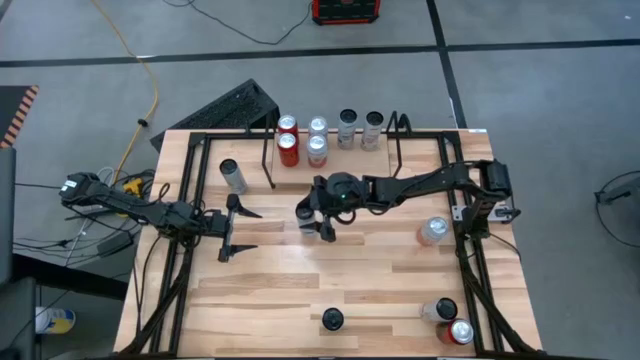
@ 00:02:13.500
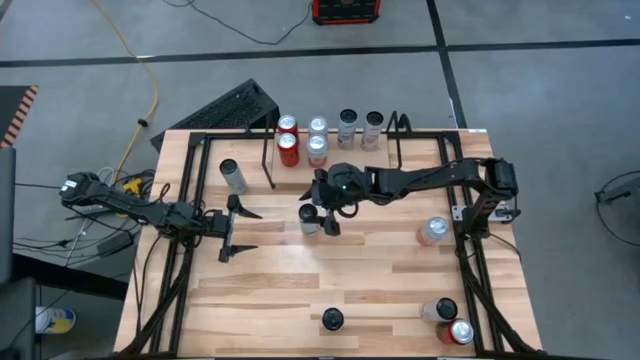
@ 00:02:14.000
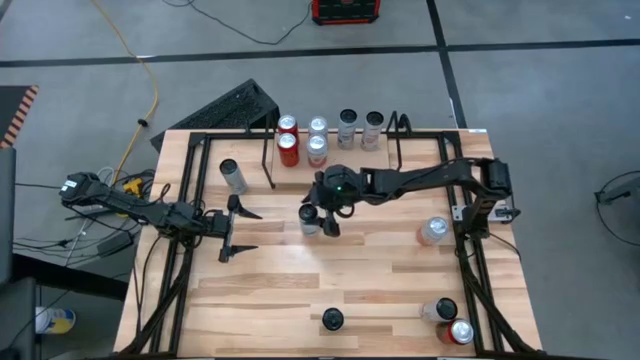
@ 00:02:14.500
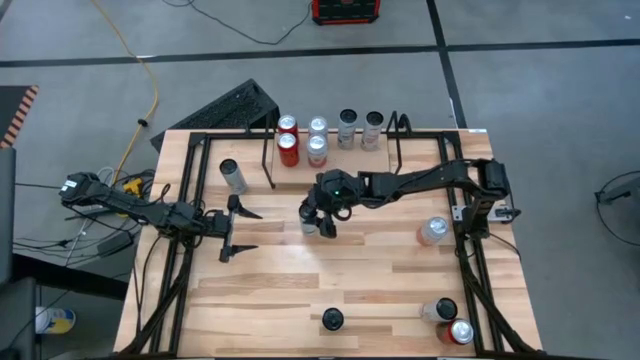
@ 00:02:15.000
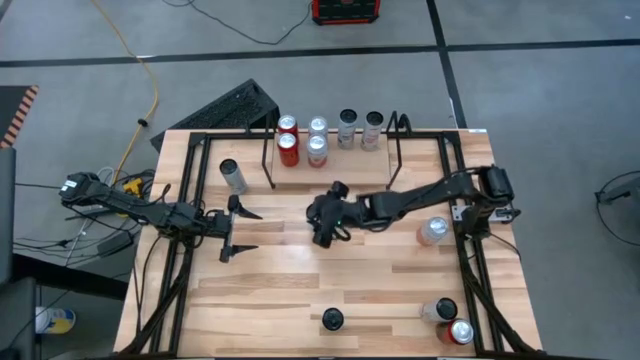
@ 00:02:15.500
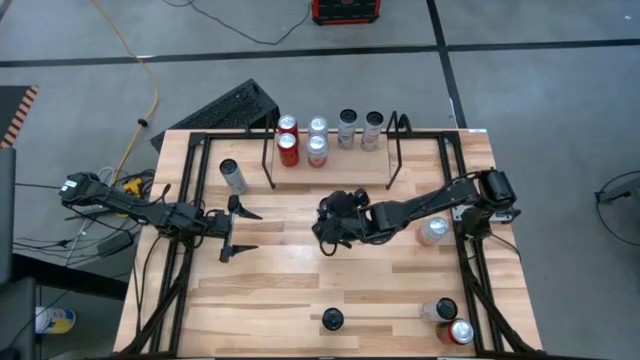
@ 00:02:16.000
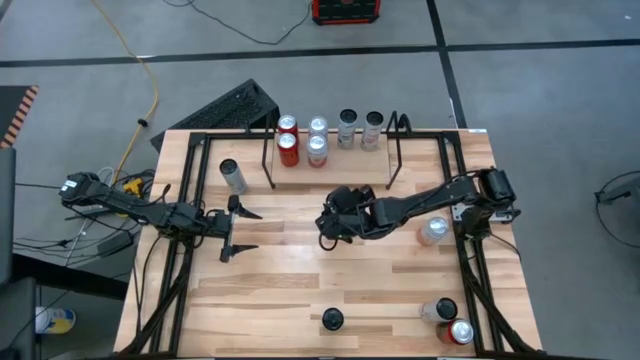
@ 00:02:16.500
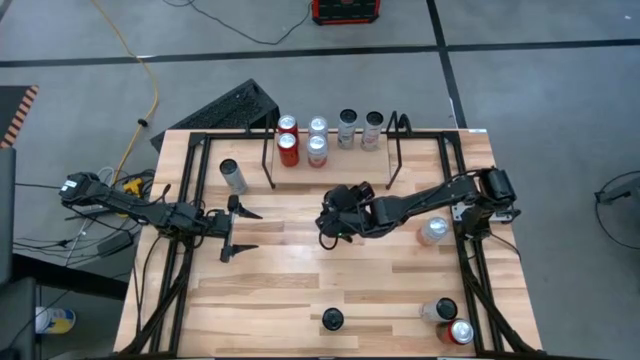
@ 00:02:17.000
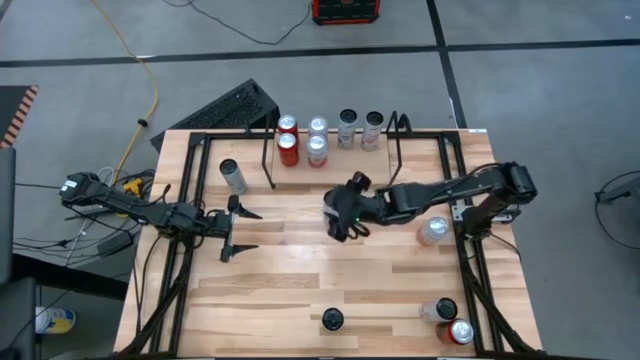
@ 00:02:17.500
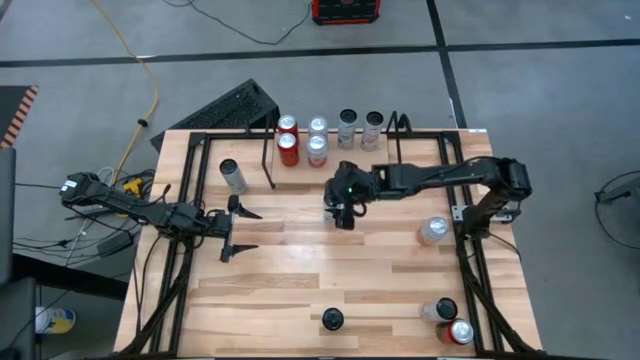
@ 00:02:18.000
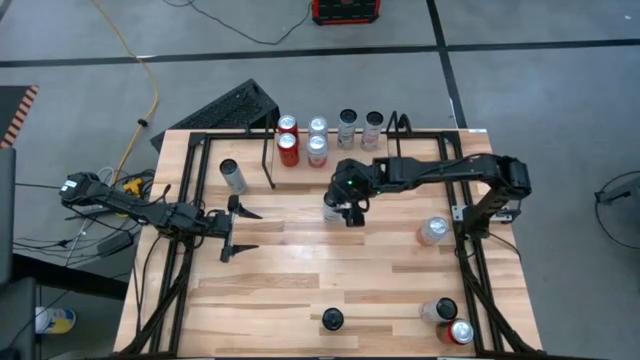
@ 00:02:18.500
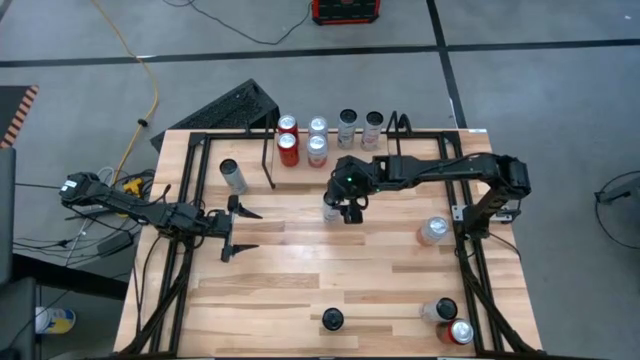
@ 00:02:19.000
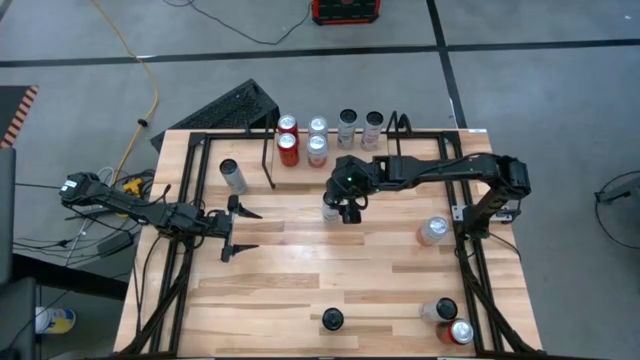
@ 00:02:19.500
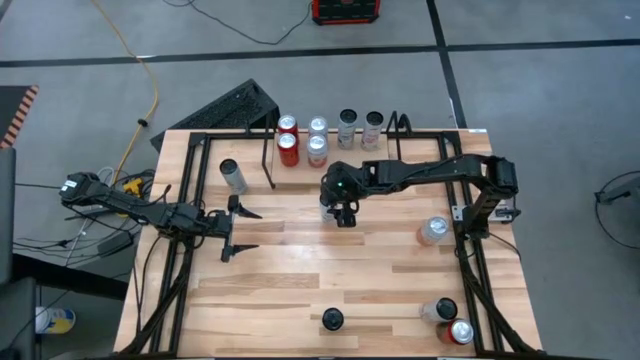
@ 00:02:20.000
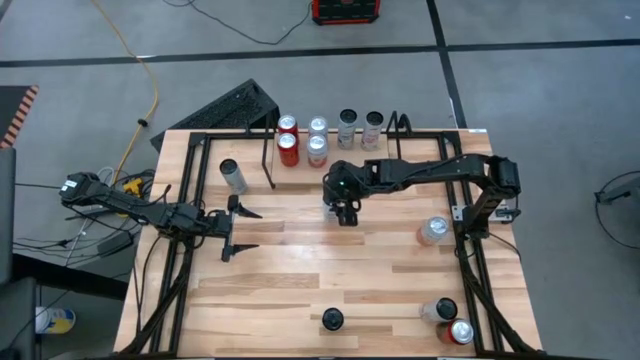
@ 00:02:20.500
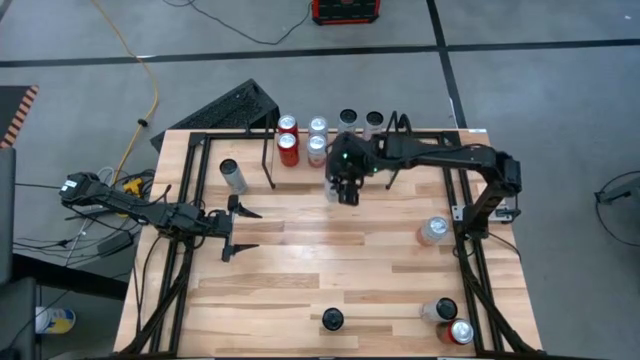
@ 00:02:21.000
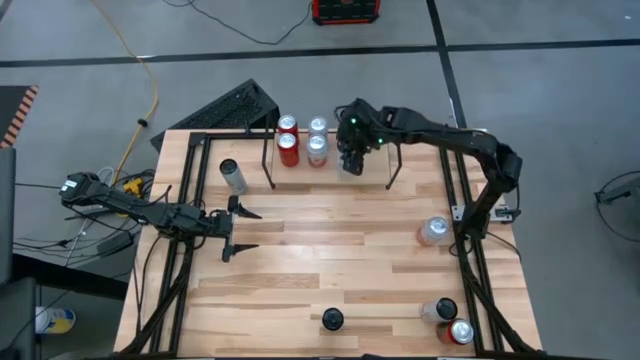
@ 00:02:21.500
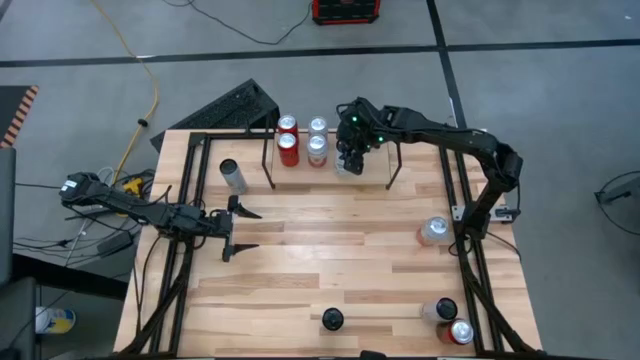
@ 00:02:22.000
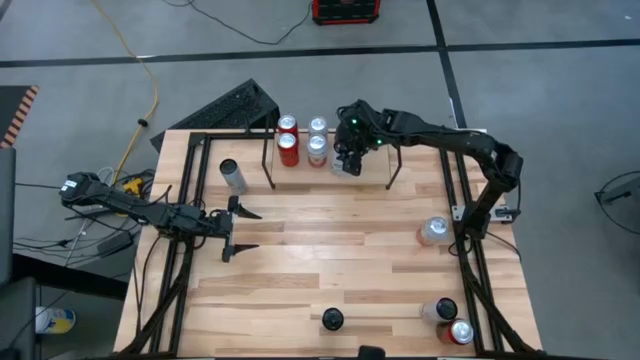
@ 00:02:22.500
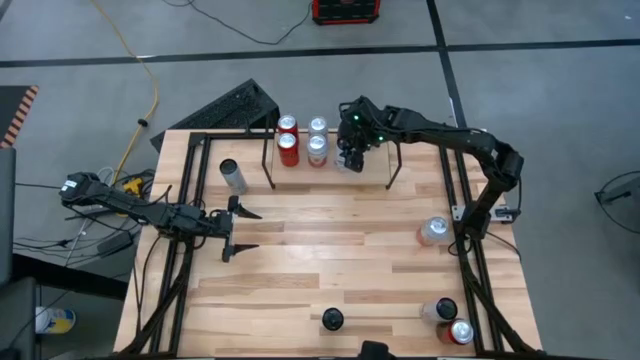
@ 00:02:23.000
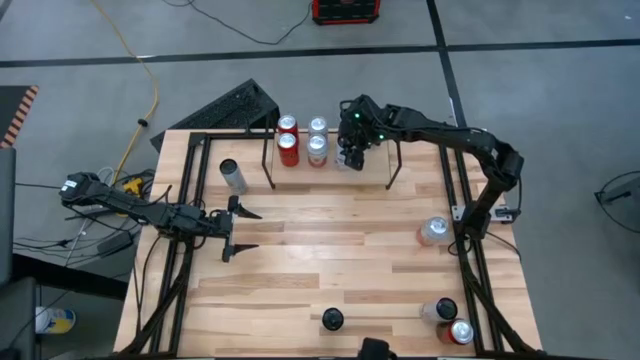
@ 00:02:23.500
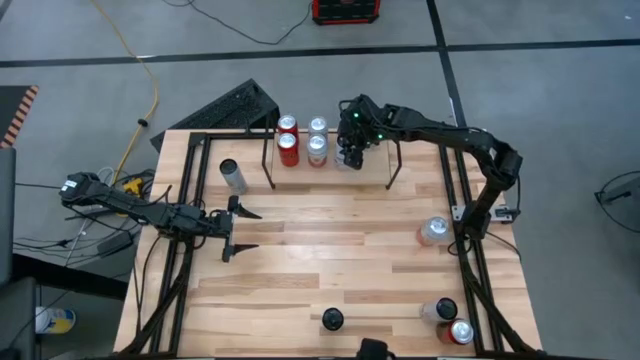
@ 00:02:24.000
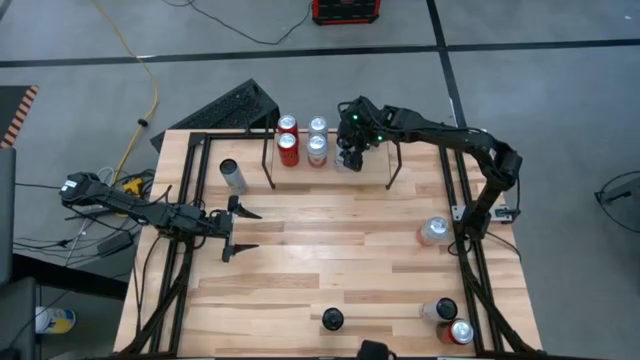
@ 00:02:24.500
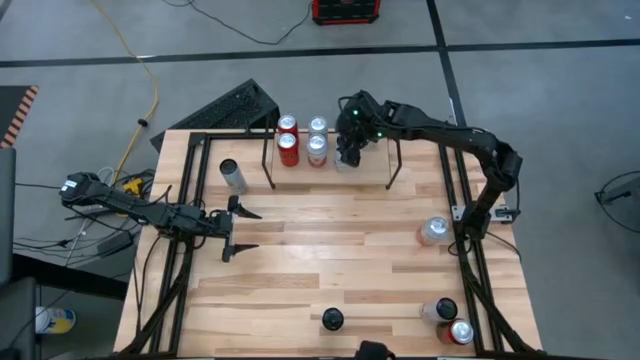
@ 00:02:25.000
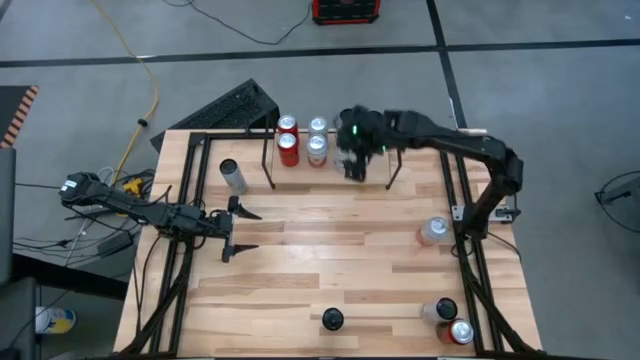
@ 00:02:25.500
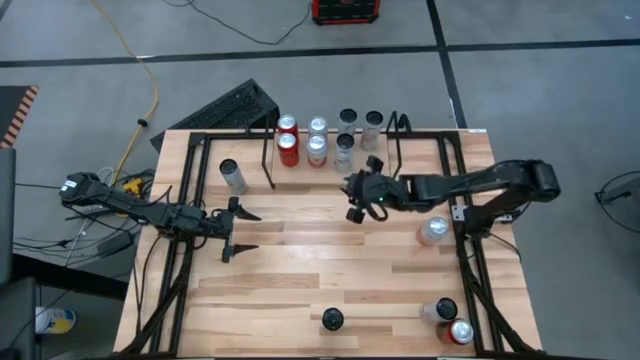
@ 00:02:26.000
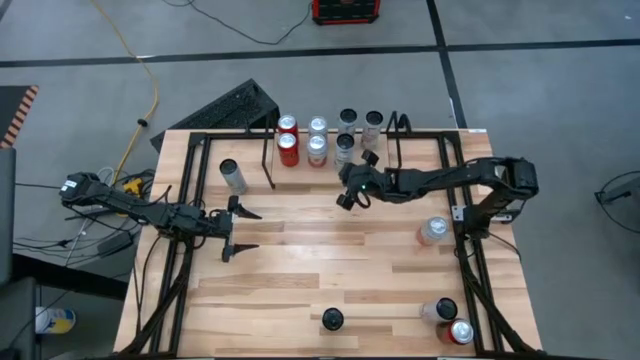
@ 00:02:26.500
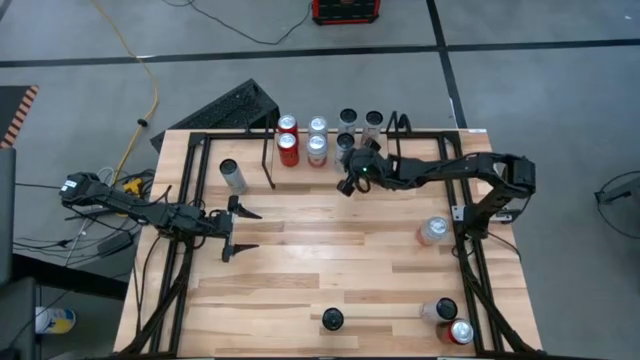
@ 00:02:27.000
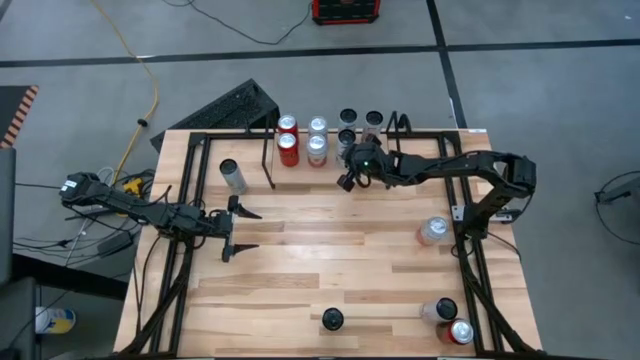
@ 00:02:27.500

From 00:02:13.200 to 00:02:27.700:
Task: Place canned beverage on shelf
Put the bottom white blue soda can on the shelf and align with other white blue soda can

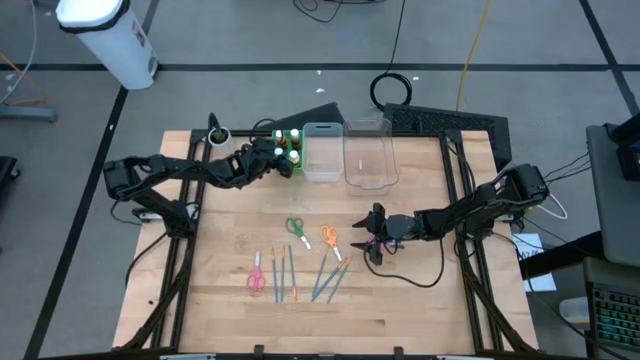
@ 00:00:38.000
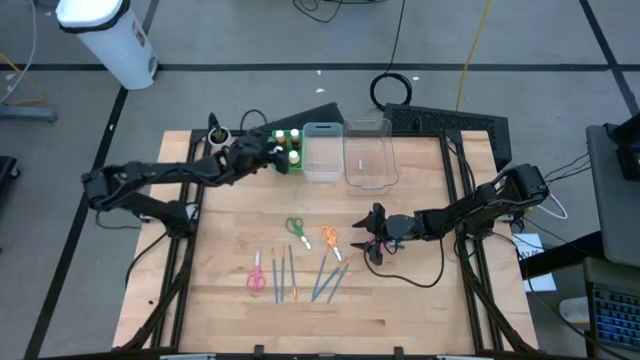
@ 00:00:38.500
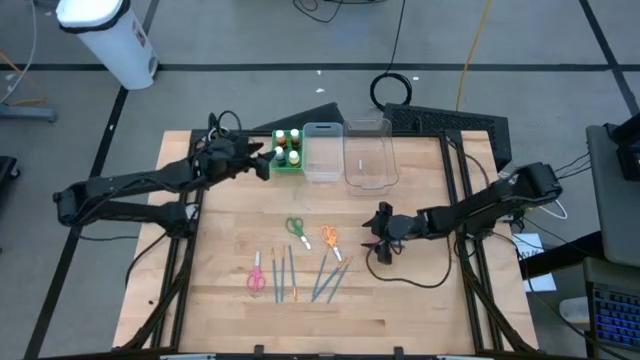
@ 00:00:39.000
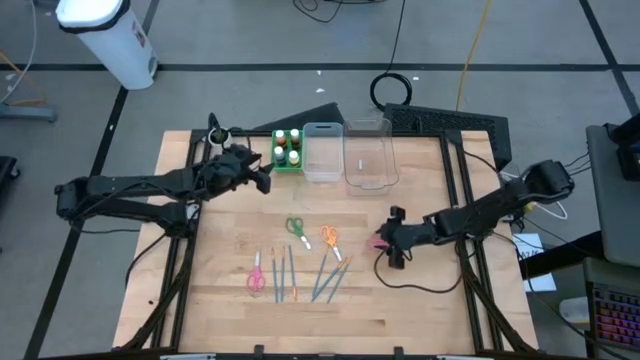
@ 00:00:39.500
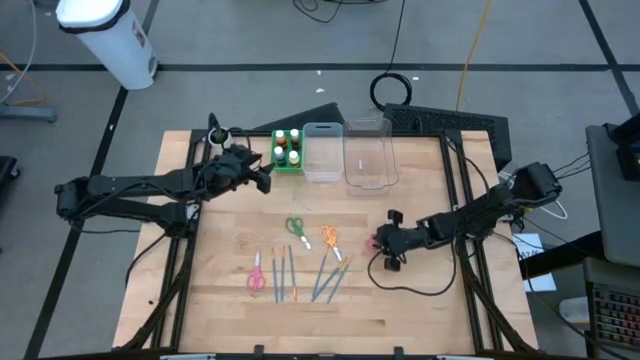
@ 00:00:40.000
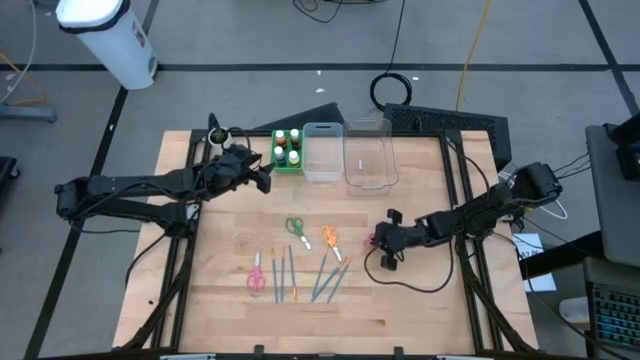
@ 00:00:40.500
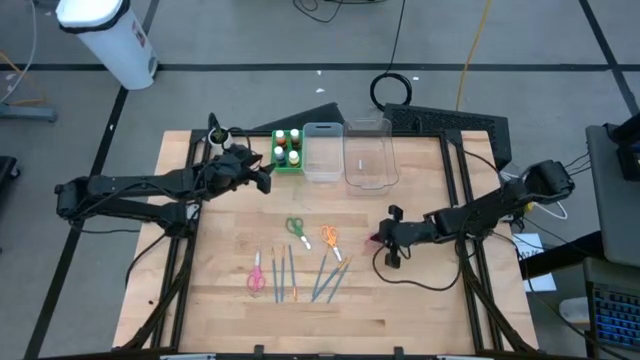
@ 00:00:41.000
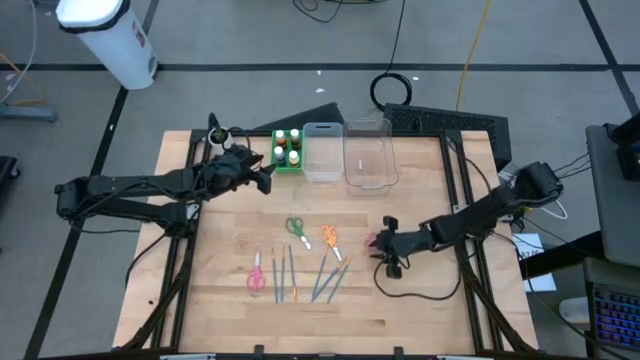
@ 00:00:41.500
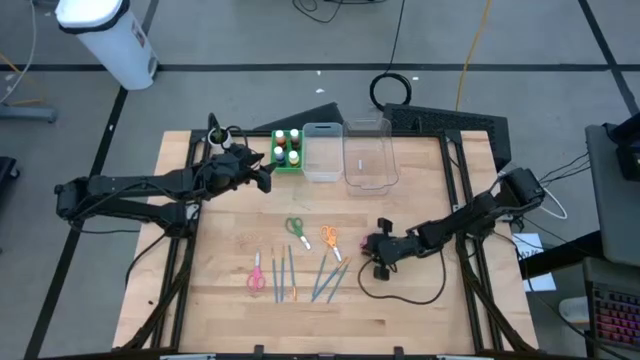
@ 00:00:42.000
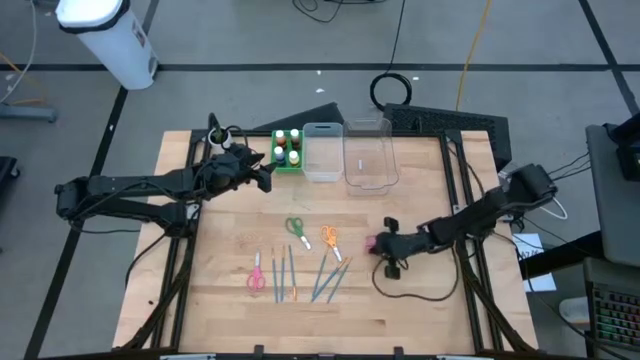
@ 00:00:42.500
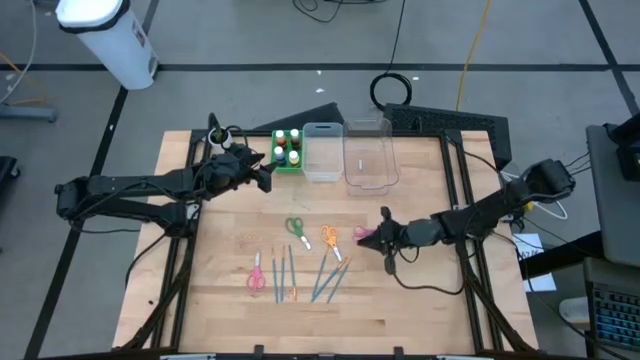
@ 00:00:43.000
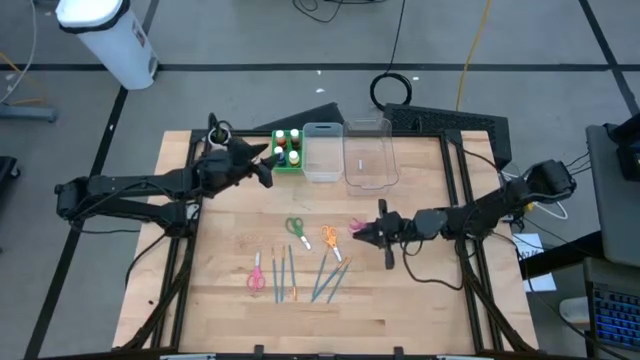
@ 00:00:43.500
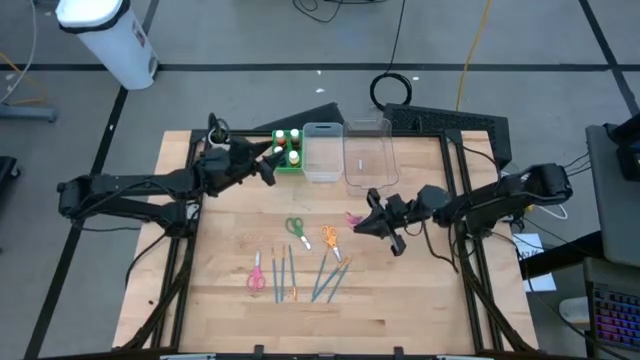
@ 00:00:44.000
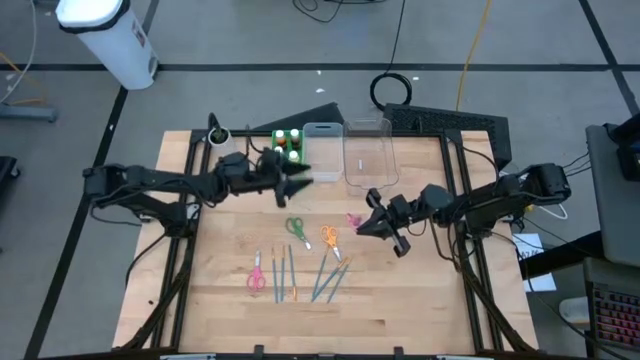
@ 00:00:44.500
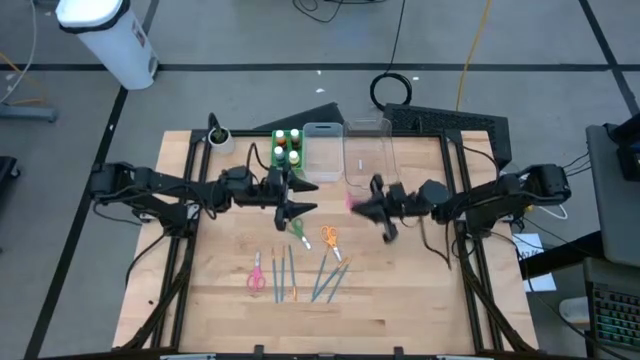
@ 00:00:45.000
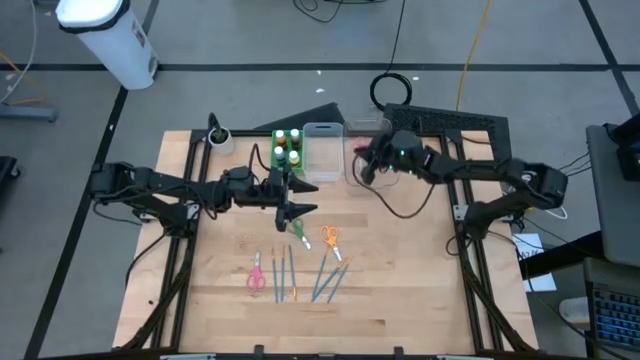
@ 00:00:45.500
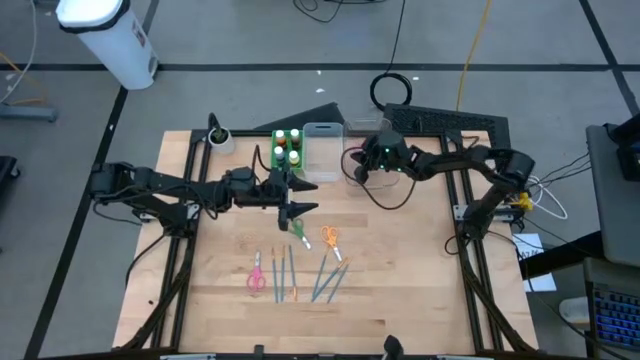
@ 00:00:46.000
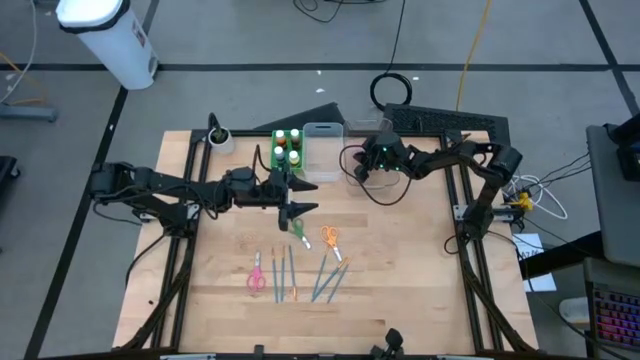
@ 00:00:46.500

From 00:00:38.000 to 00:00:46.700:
Task: Pick & Place Paint Supplies
Put the top right pink scissors into the transparent bin
